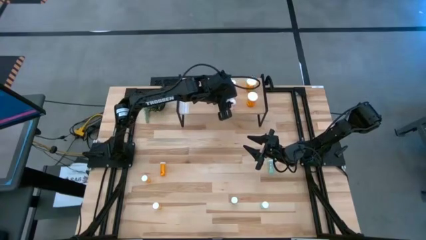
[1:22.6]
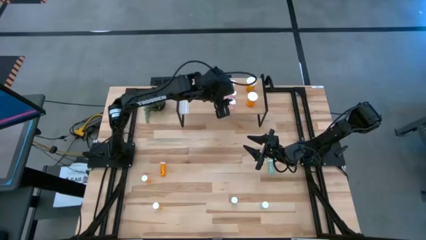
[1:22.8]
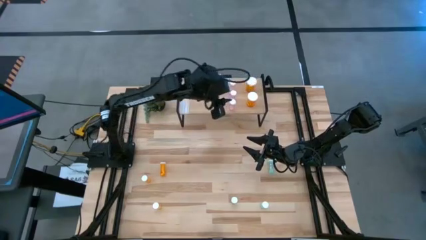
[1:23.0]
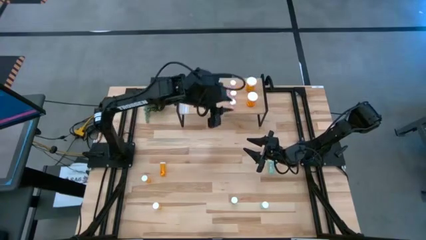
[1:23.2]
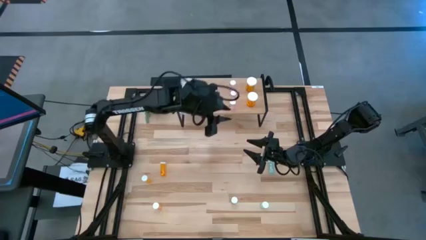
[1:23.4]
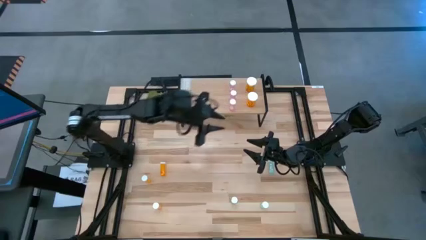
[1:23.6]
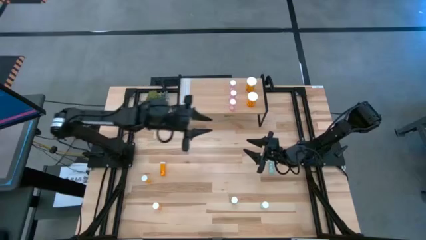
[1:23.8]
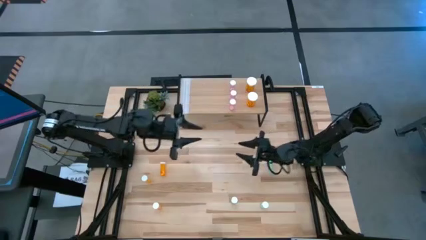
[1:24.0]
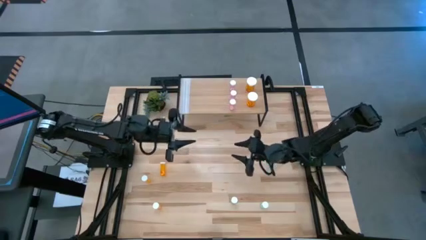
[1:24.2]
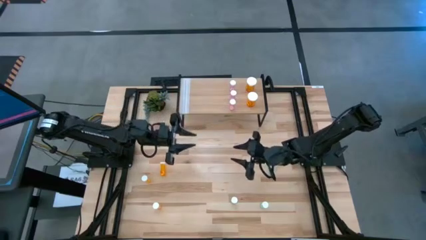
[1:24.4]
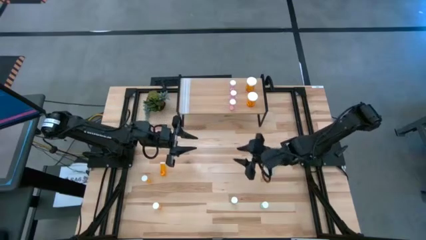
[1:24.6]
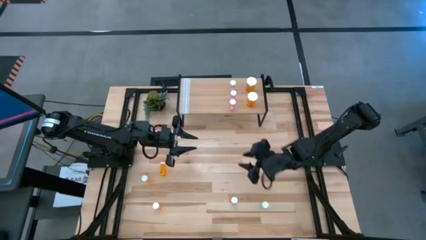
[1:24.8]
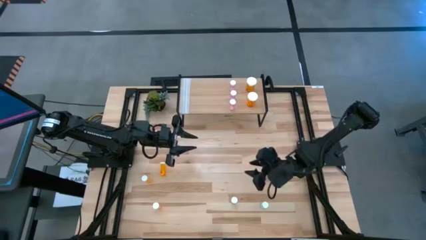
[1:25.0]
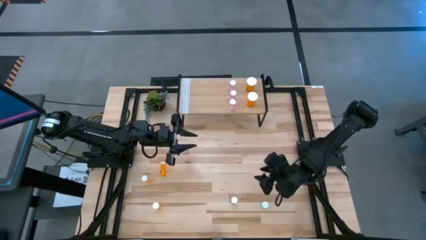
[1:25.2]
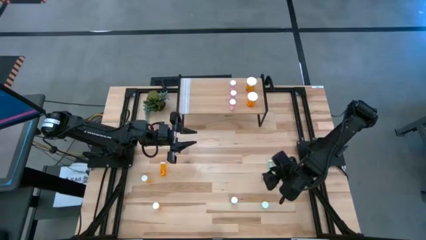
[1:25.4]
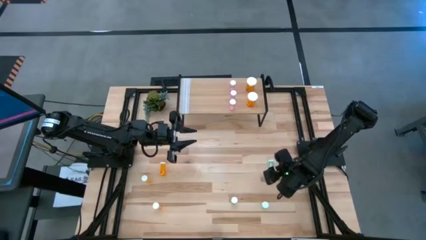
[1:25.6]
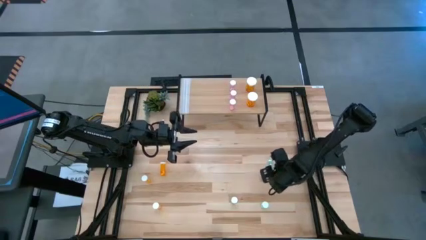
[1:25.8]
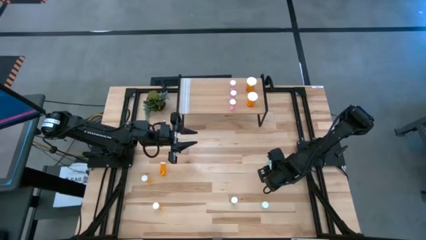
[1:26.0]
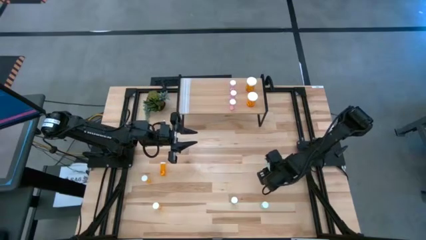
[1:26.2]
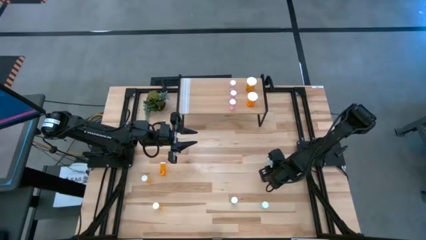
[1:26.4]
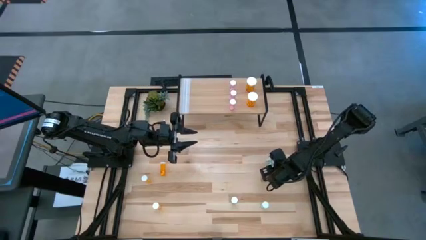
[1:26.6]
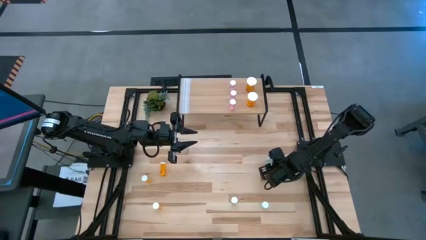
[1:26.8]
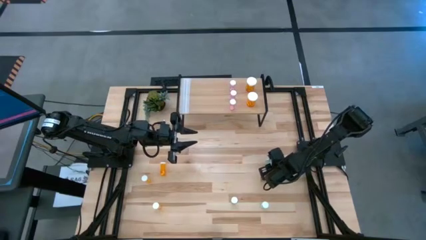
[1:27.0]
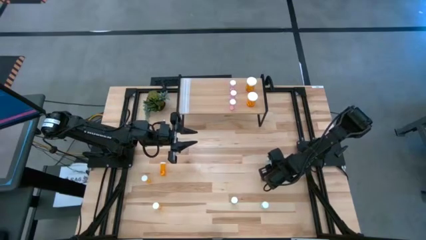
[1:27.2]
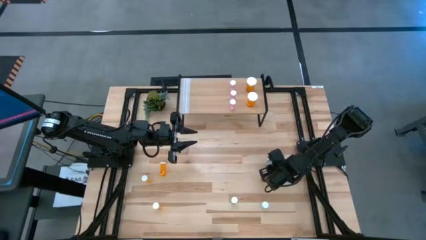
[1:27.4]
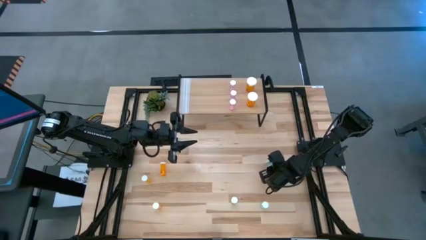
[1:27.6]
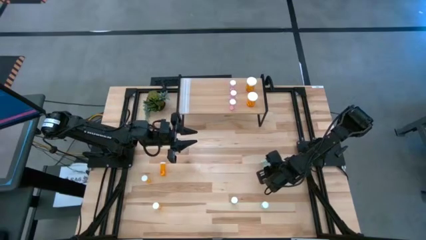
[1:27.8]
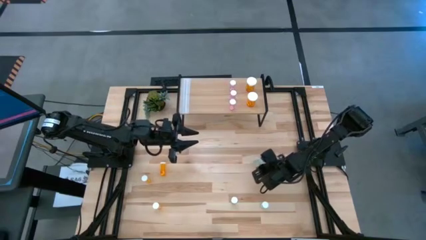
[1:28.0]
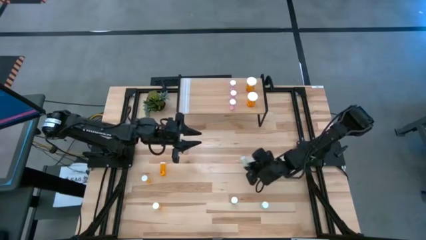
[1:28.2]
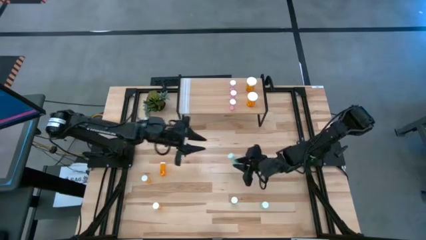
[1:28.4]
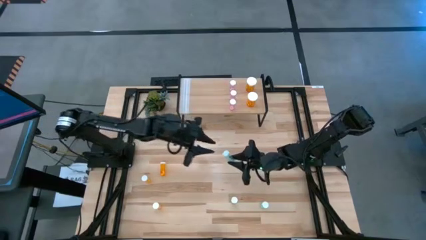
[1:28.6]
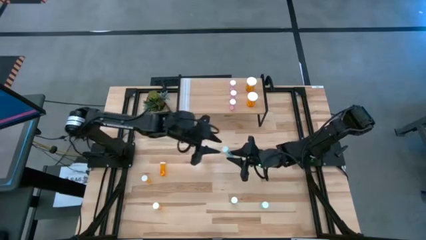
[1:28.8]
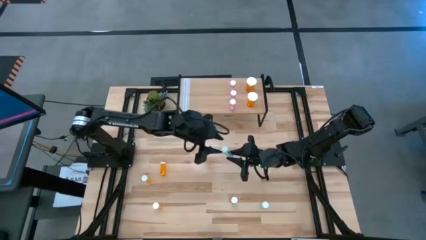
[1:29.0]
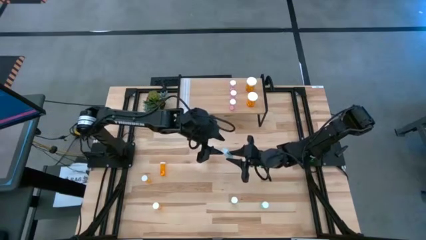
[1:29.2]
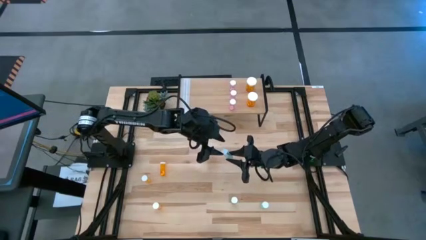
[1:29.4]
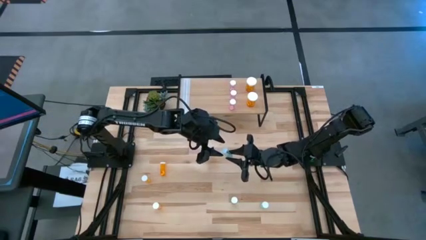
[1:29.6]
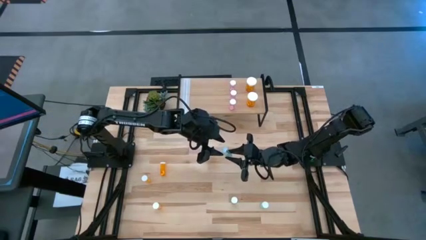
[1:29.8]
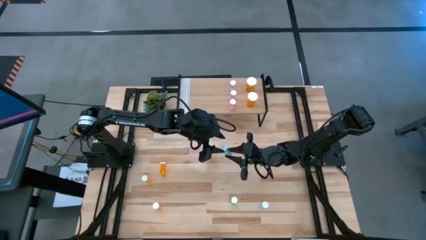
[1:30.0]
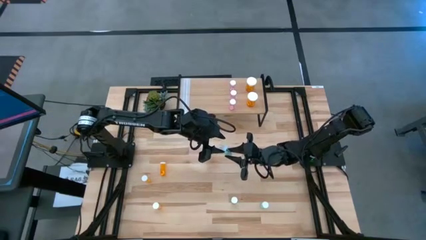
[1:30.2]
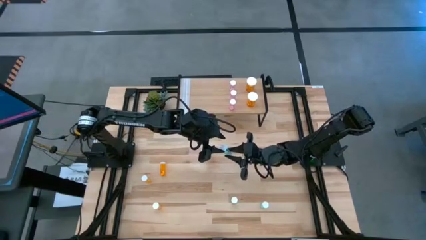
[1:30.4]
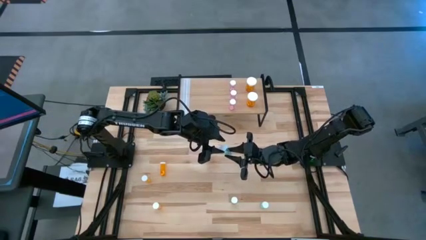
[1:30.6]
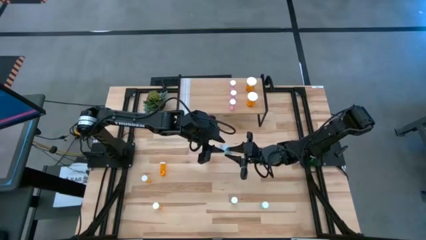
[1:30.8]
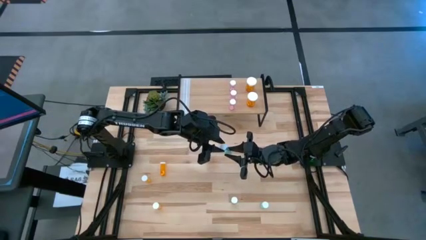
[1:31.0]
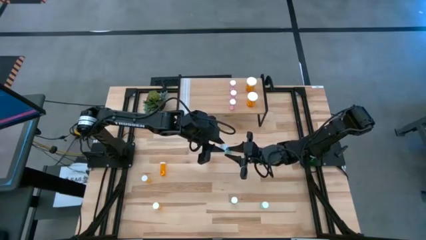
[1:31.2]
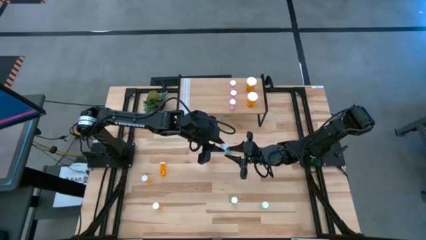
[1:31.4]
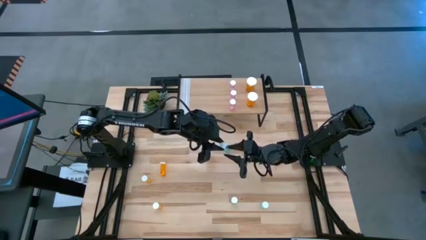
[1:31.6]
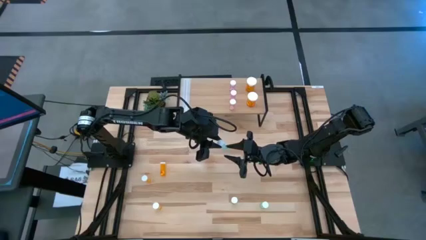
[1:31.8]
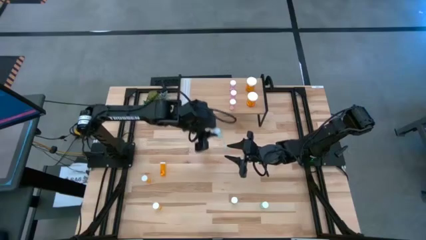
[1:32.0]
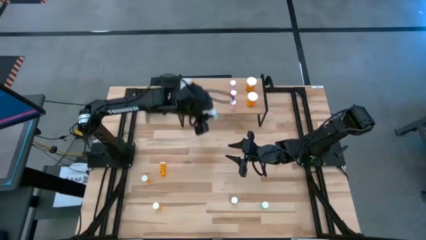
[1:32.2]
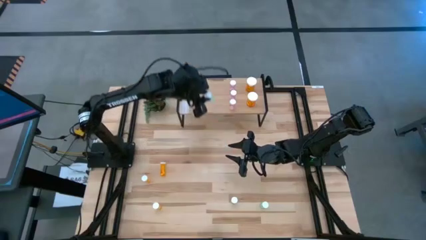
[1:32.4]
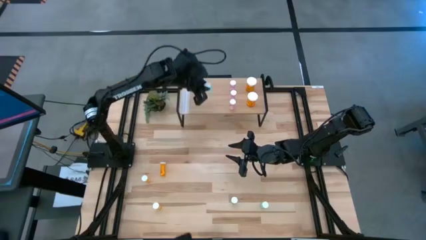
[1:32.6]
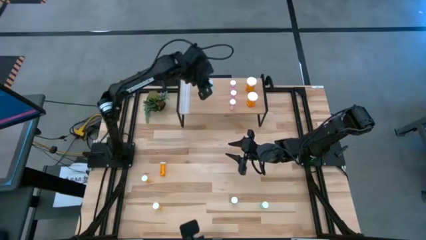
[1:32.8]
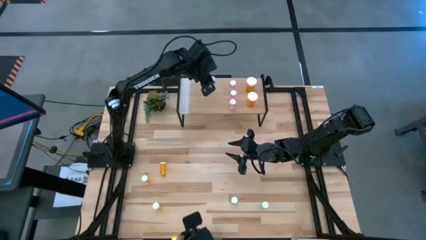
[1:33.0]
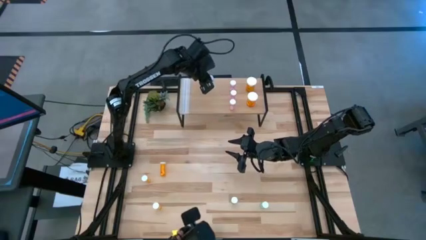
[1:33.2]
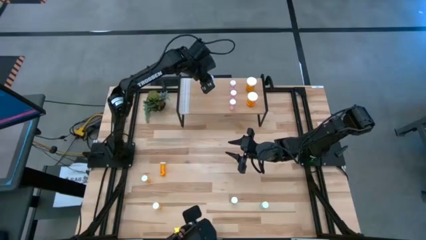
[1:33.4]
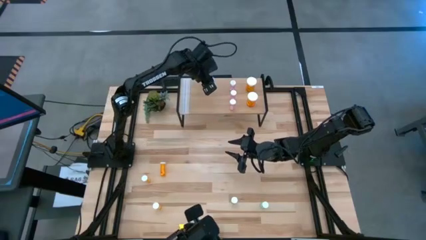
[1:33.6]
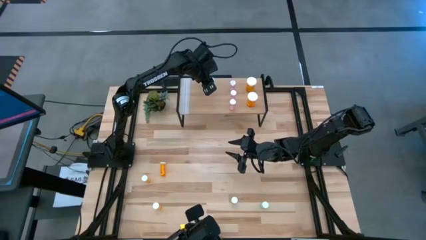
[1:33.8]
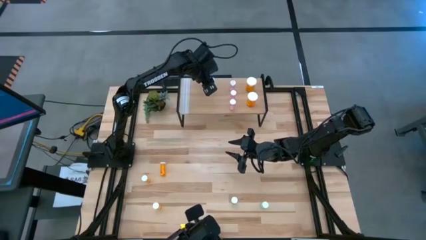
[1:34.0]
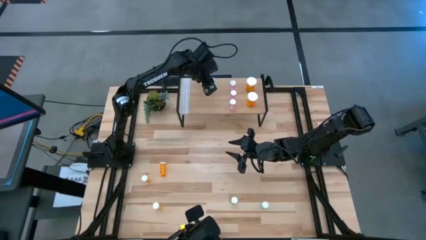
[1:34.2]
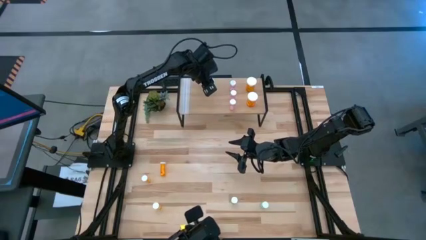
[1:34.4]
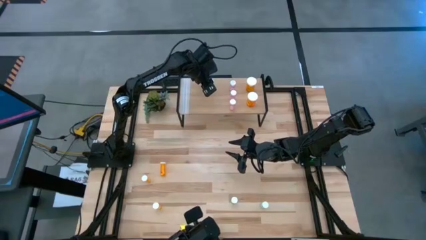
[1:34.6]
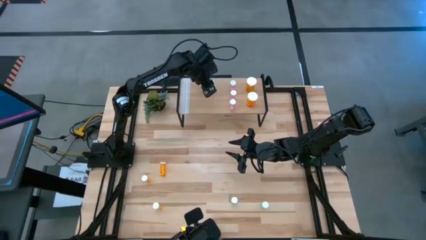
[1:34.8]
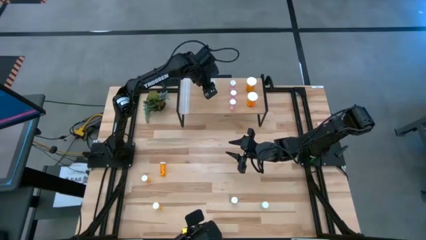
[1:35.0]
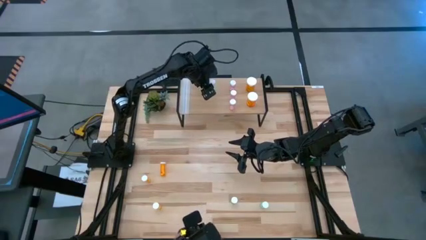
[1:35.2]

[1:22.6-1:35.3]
Task: Pick and place medicine bottles onto shelf by color
Put the top green pill bottle on the shelf
